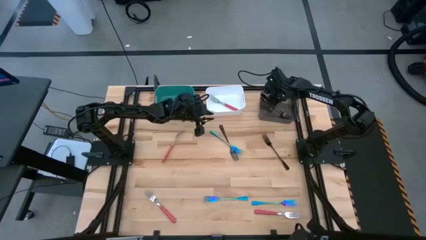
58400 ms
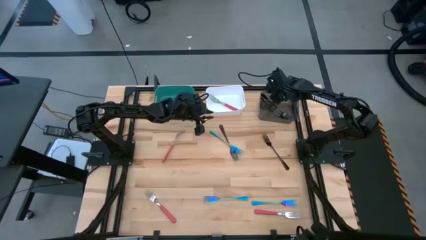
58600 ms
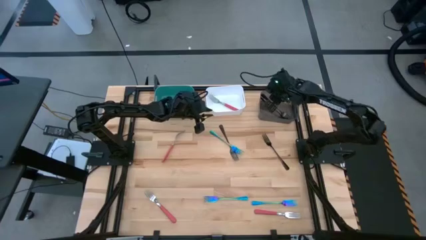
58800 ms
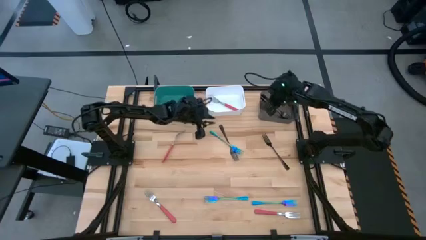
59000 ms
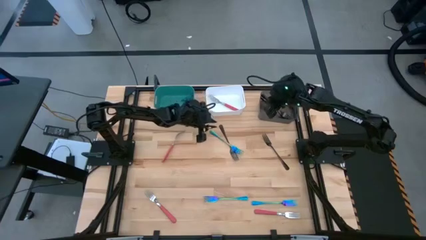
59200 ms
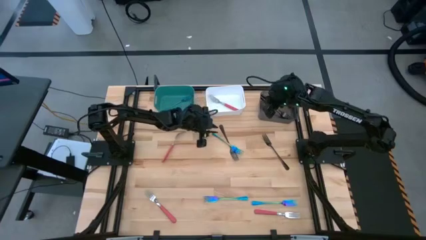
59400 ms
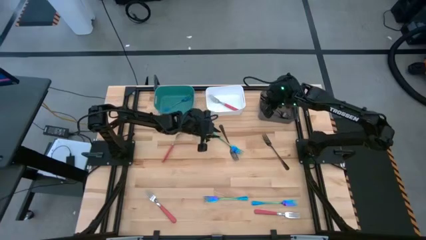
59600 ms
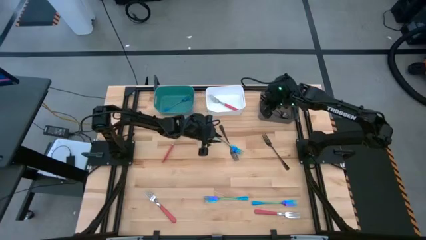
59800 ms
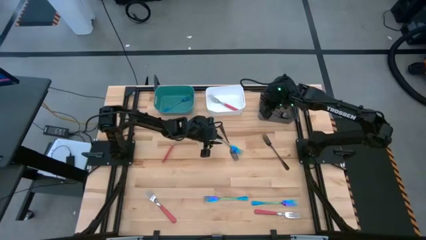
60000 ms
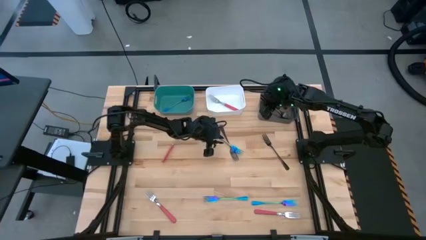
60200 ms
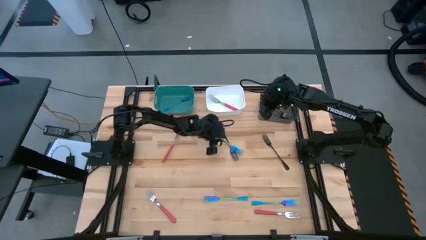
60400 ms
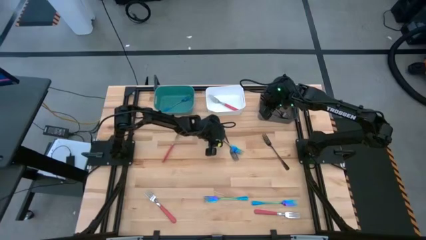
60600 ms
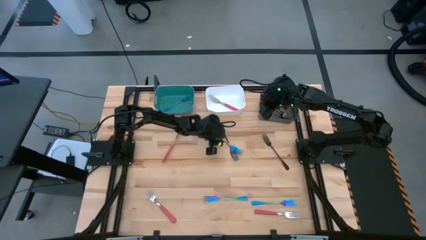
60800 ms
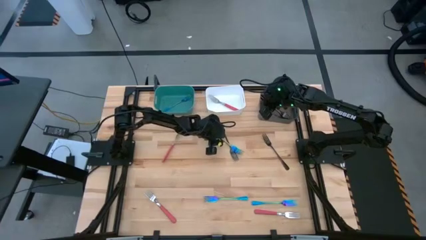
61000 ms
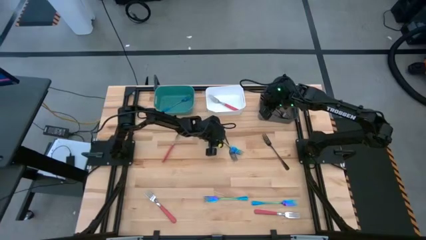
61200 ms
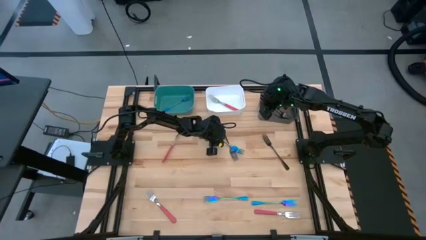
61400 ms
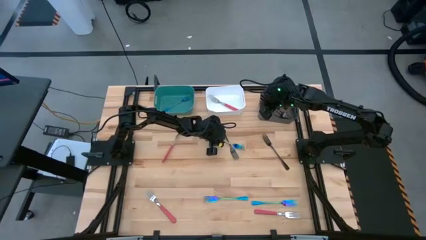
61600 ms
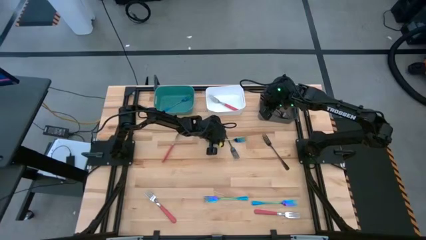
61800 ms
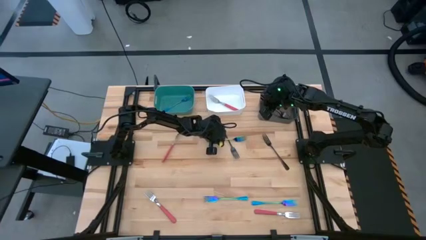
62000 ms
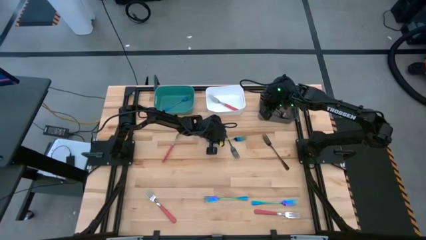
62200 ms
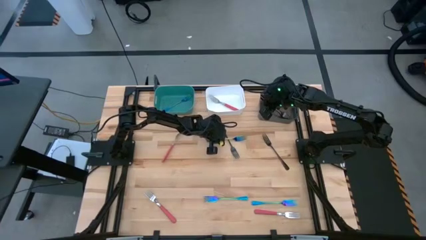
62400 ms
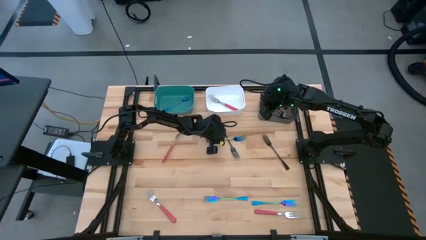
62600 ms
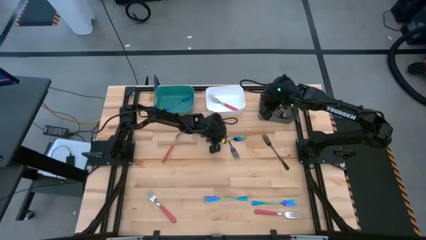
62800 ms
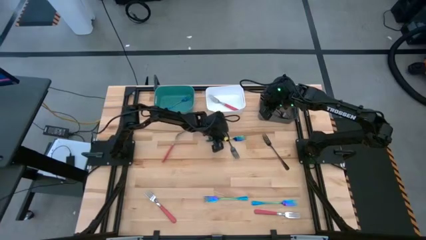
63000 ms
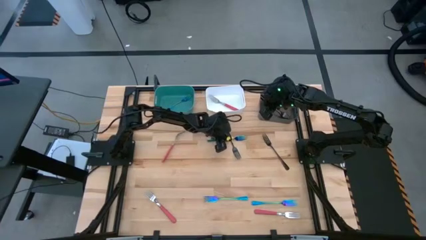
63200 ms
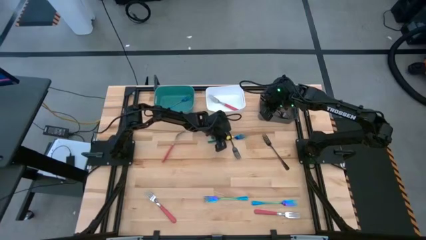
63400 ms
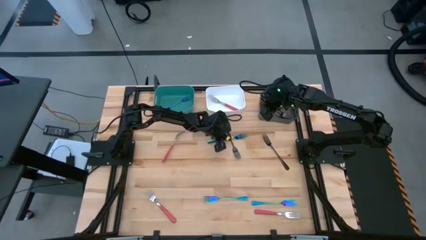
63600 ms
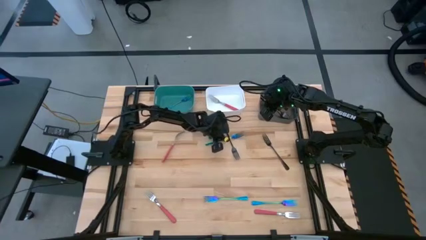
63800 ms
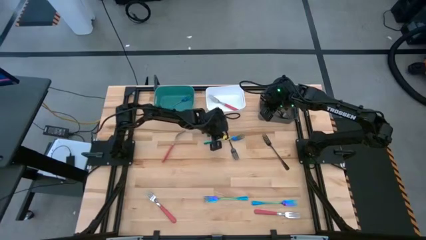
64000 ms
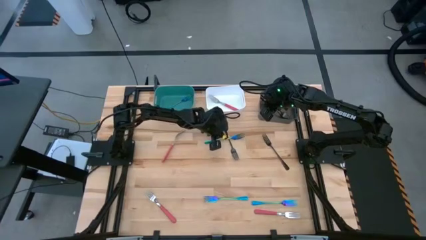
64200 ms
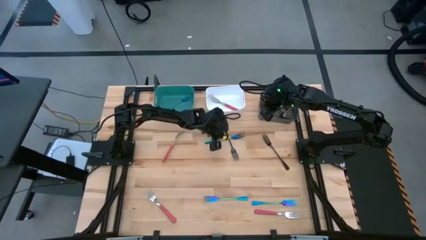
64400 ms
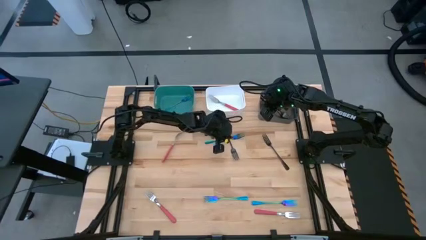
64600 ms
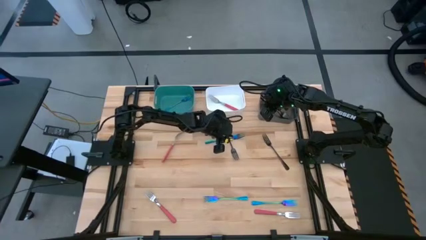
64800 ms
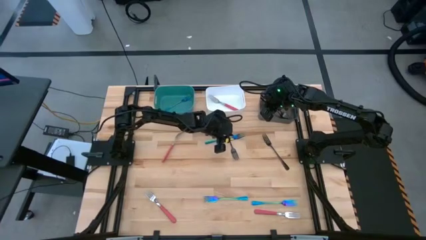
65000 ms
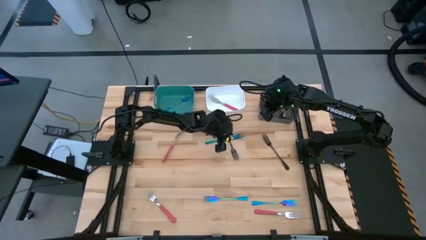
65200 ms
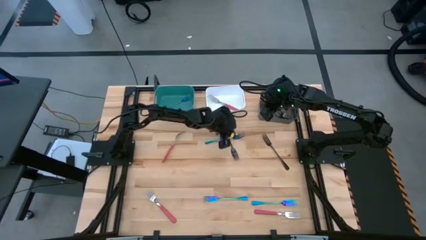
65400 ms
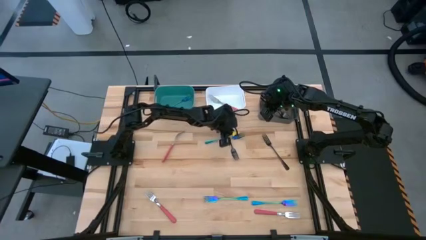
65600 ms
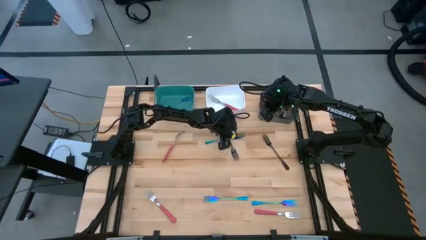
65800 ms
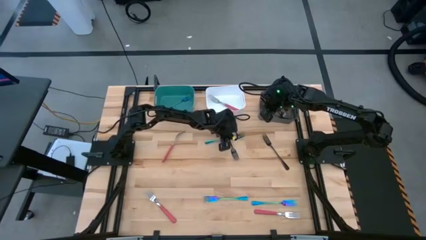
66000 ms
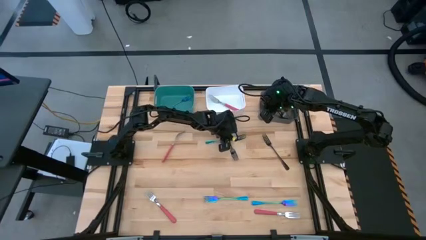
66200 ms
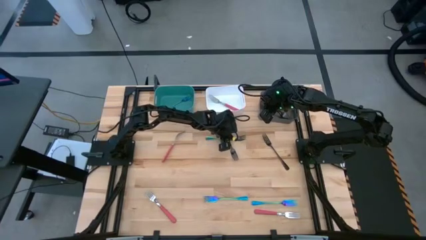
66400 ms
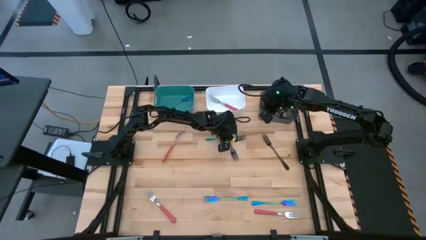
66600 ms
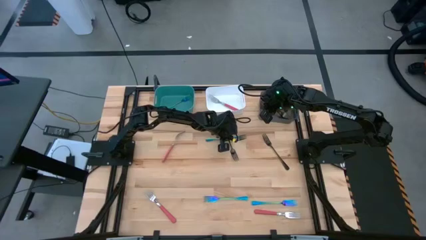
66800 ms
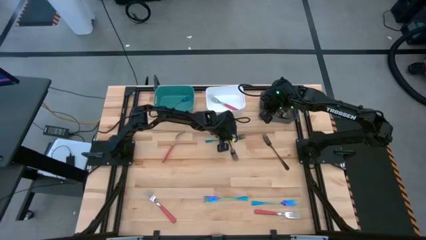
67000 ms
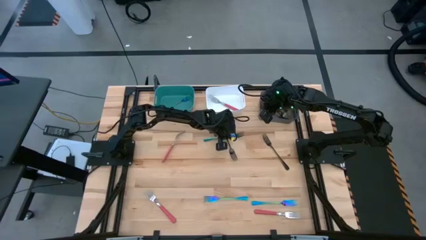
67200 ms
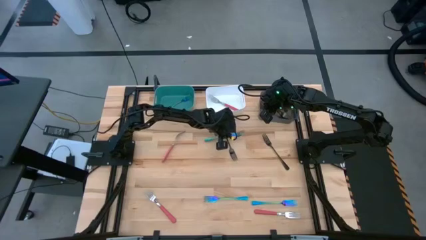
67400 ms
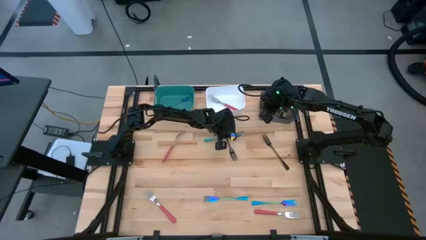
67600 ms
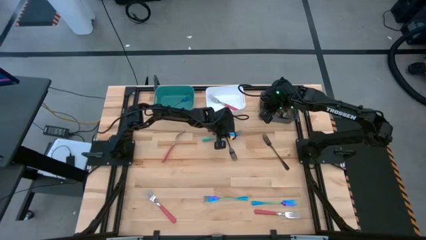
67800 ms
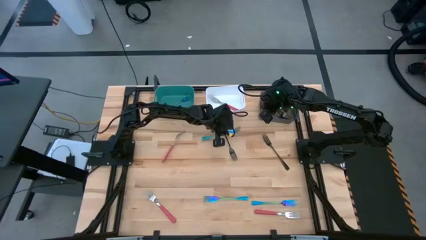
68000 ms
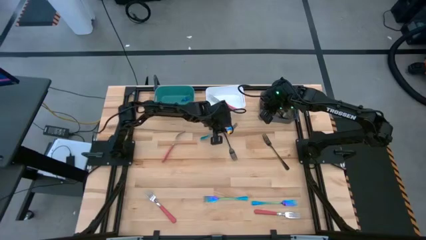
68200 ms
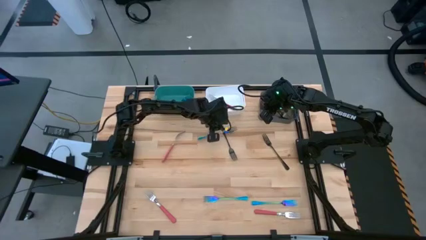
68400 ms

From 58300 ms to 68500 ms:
Task: Sort silverware by color (type)
Put the iridescent blue fork into the green bin
